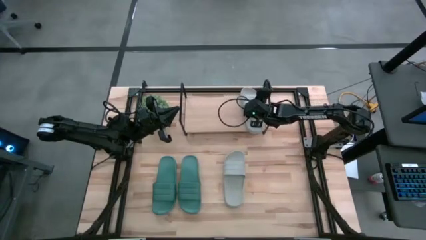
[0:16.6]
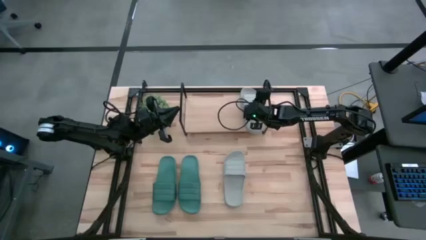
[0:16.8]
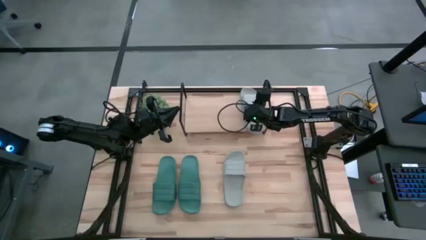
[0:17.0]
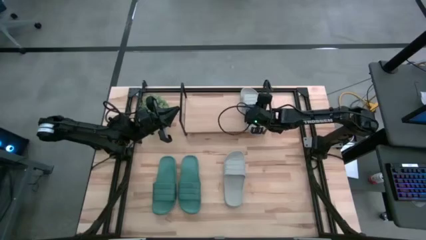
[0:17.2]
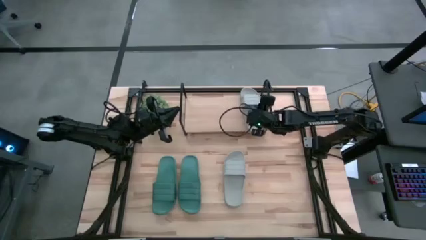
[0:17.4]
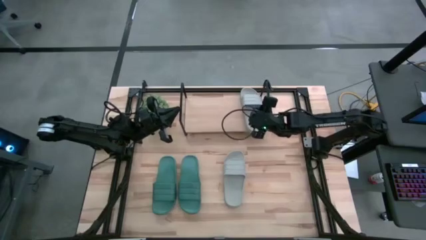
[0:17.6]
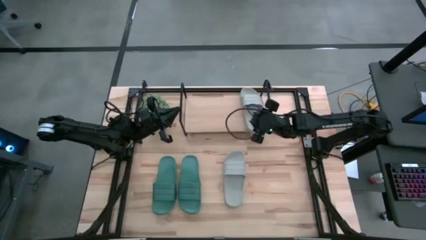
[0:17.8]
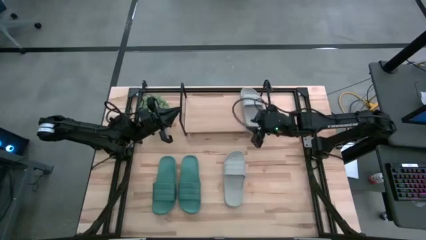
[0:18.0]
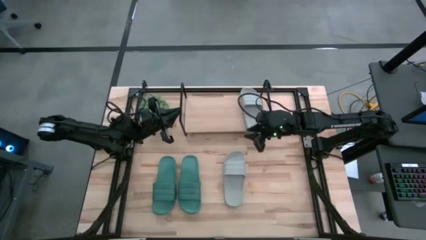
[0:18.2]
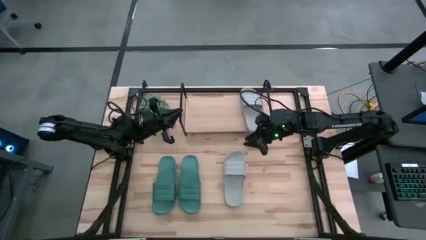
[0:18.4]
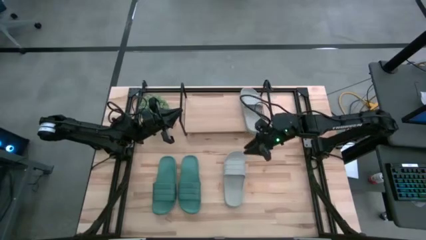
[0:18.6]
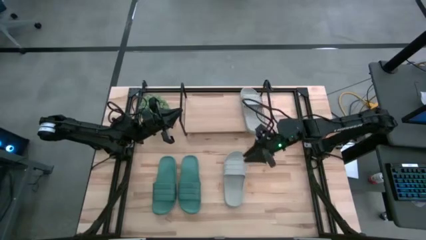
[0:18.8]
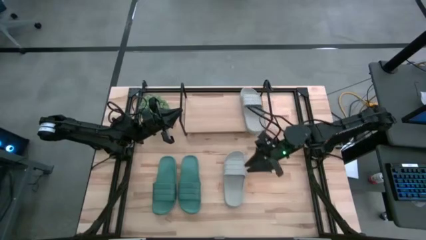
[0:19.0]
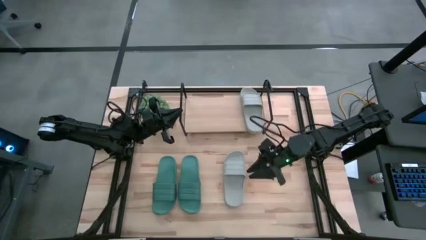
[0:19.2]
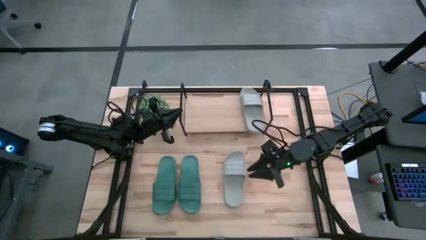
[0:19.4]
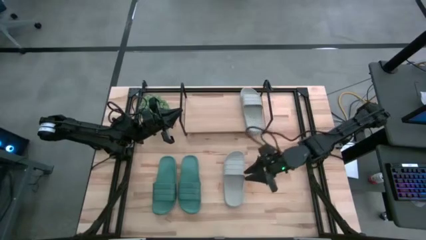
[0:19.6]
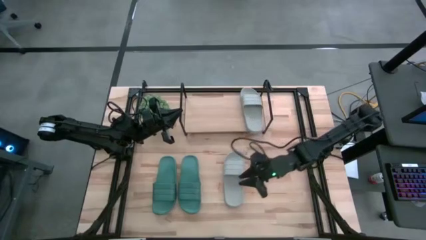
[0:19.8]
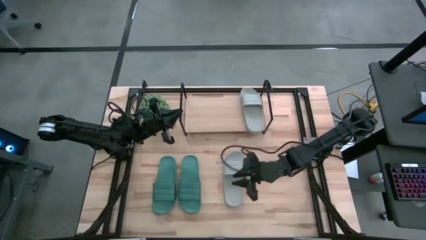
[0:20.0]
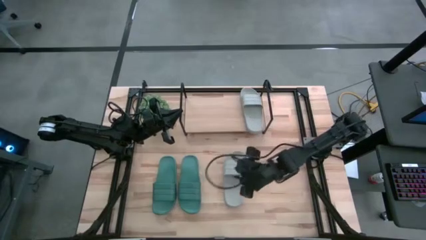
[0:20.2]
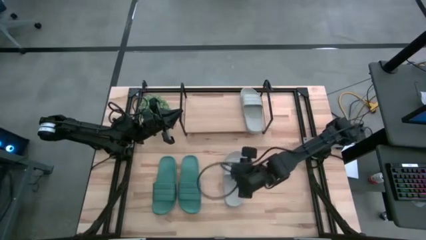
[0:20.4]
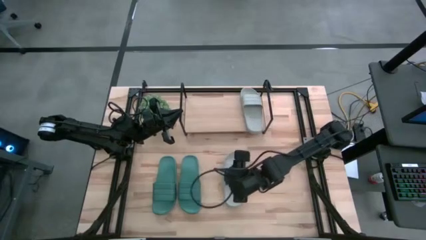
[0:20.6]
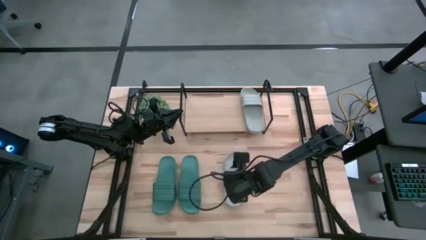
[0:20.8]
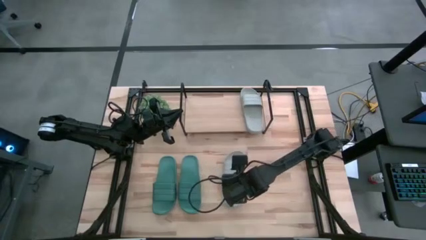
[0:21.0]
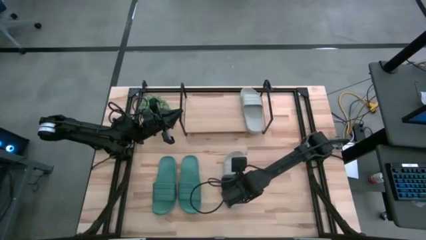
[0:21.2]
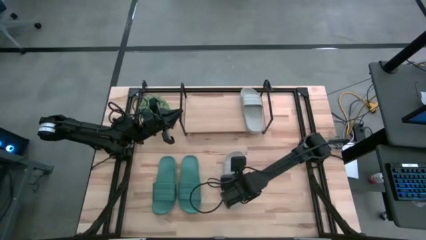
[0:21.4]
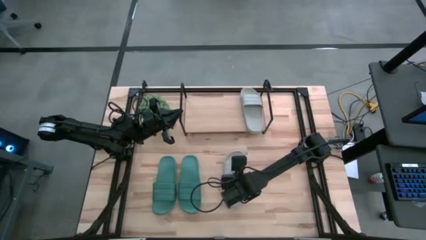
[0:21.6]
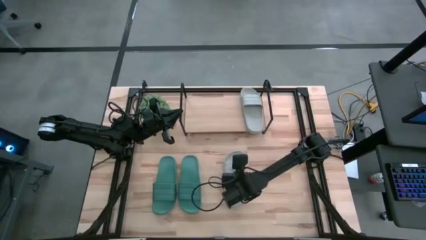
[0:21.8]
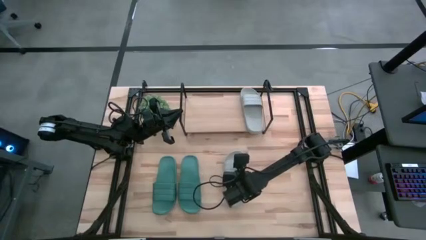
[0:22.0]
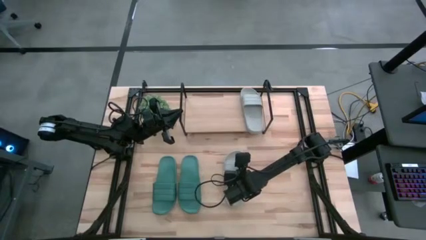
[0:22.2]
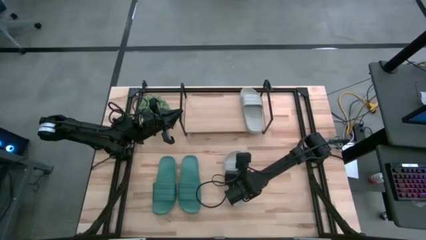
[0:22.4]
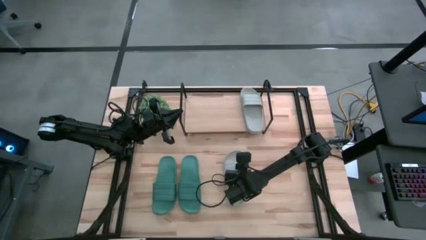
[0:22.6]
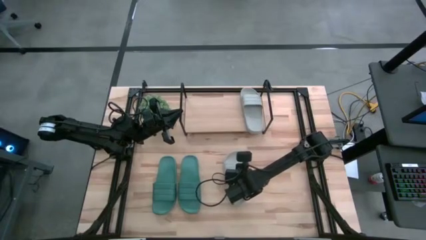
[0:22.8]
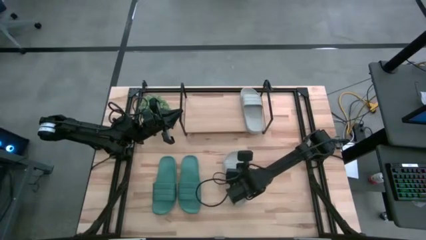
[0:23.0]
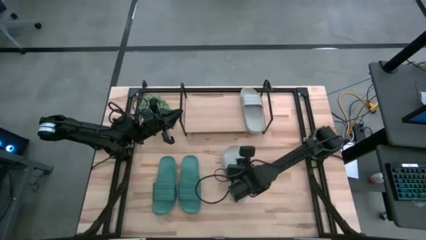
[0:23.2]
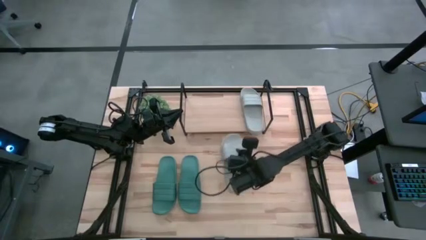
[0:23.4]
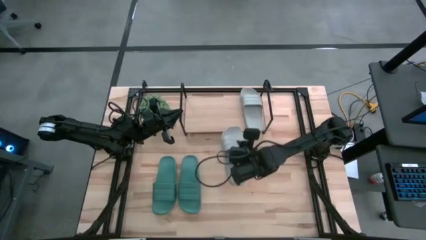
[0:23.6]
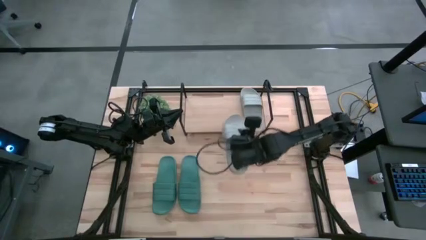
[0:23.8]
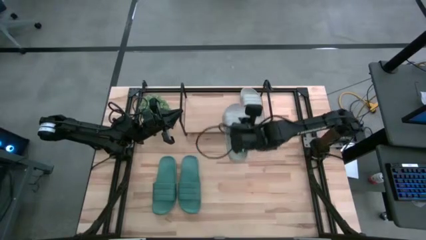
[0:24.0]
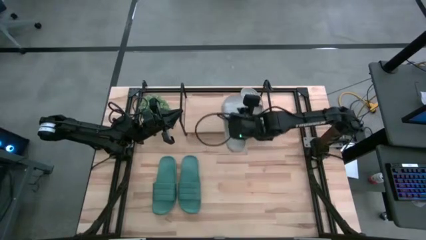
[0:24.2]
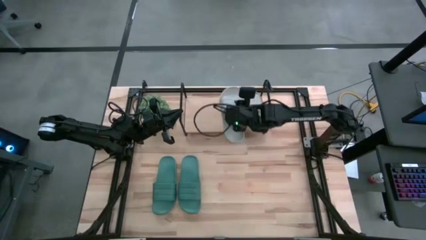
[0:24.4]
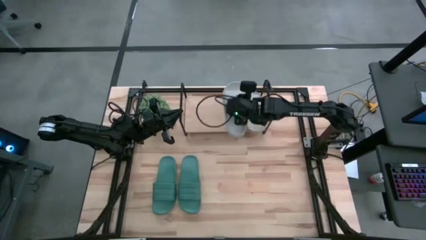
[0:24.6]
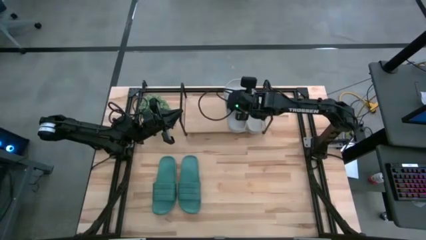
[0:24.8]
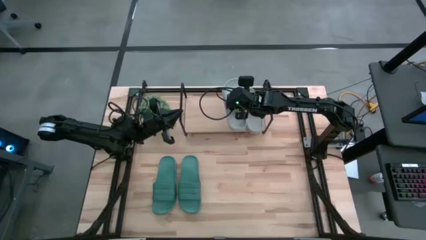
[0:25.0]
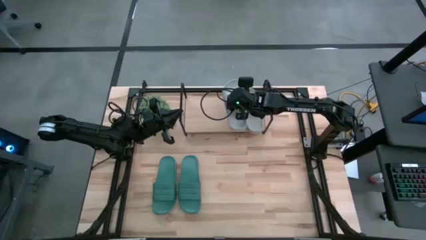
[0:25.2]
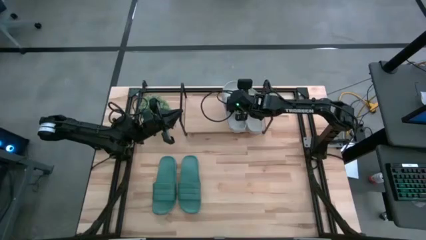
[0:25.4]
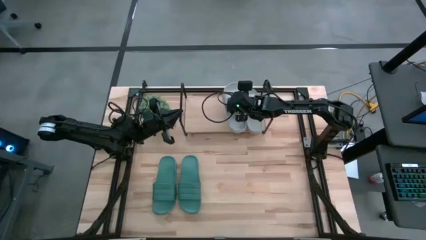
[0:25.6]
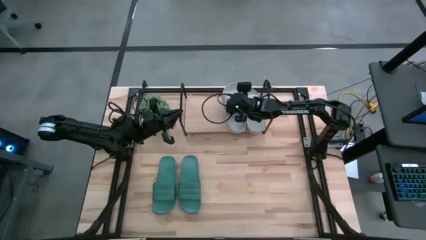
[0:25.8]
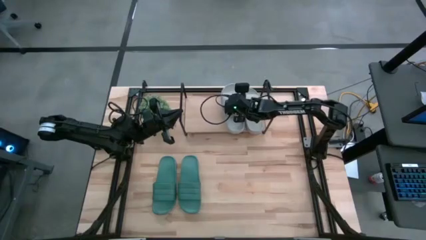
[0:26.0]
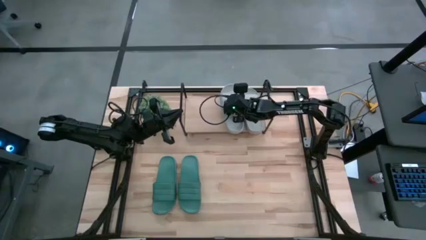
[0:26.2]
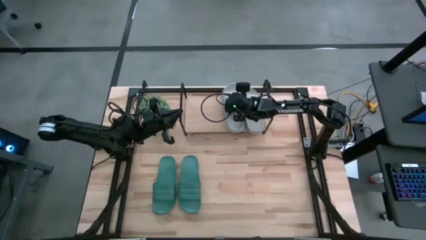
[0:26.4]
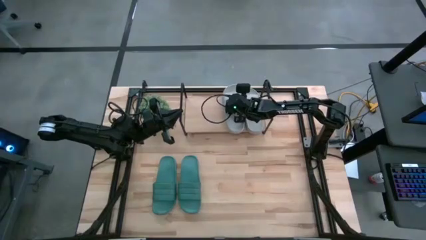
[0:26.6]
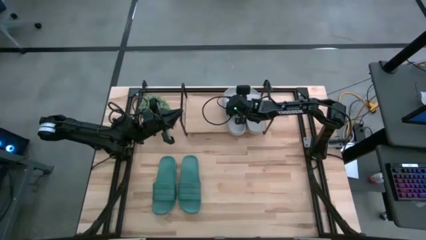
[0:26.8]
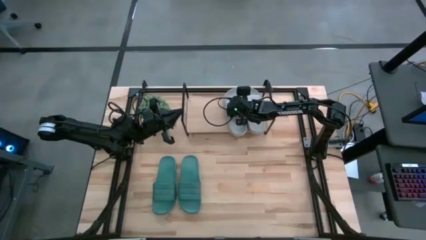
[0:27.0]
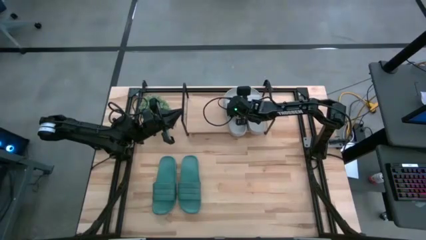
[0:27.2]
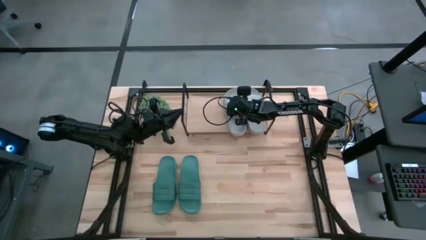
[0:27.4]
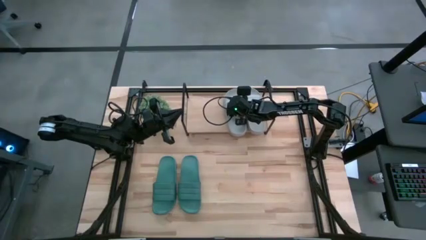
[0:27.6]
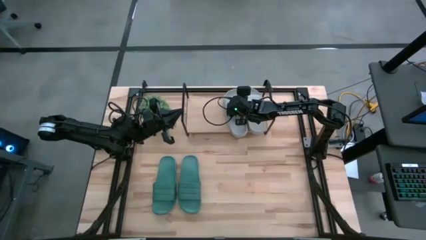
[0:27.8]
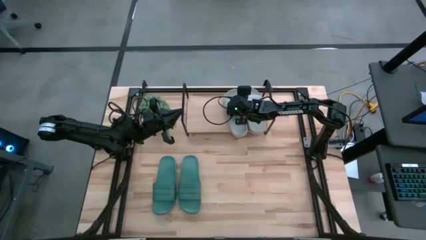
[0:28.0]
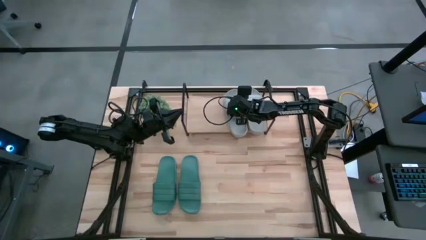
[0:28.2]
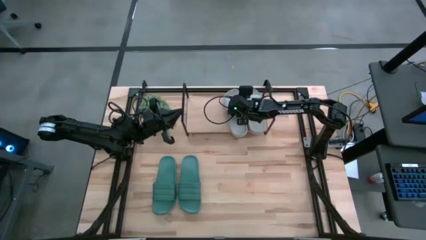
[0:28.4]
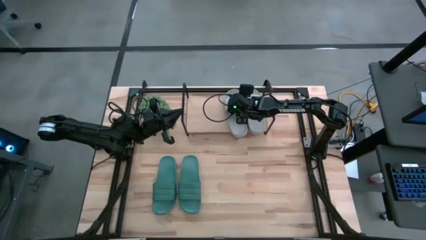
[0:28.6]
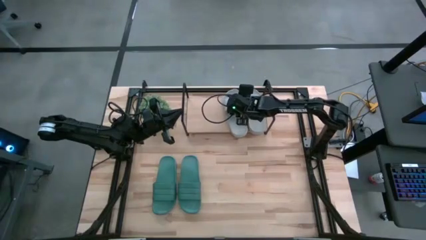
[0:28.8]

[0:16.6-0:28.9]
Task: Pick and place slides into the shelf
Put the gray slide on the shelf

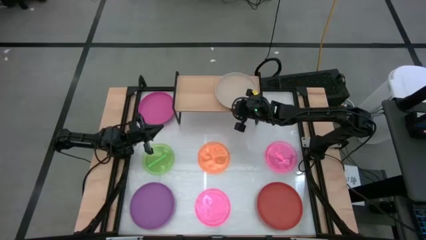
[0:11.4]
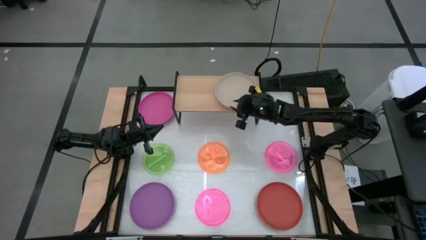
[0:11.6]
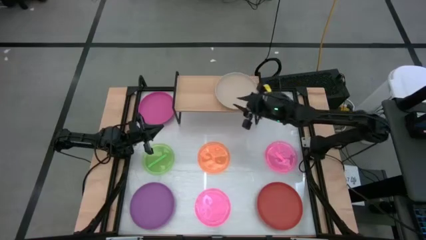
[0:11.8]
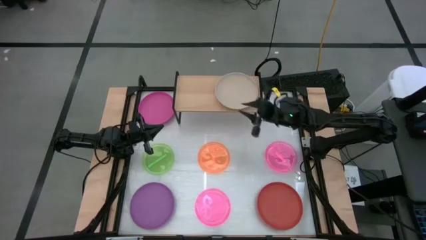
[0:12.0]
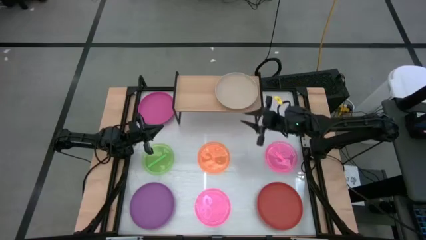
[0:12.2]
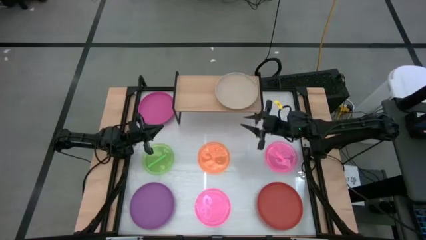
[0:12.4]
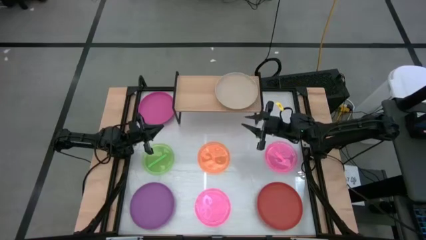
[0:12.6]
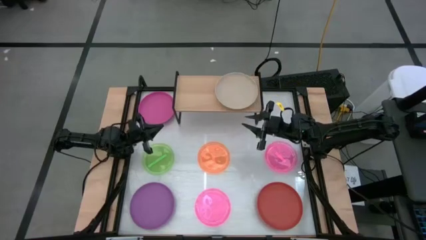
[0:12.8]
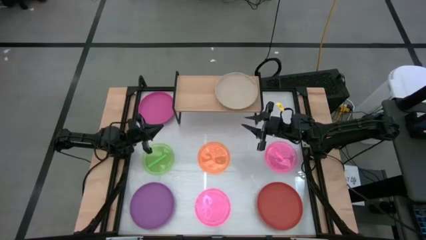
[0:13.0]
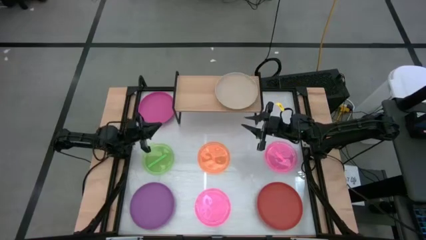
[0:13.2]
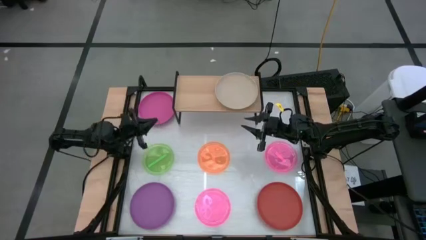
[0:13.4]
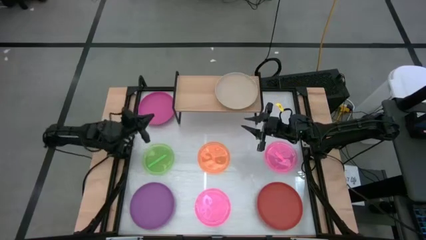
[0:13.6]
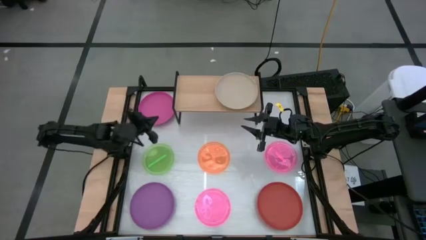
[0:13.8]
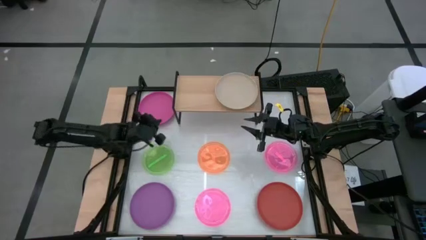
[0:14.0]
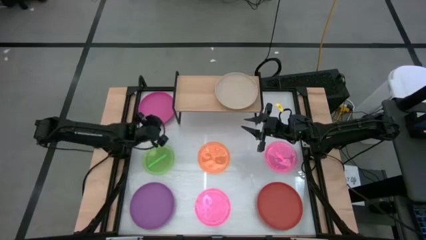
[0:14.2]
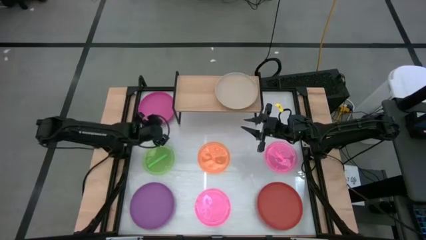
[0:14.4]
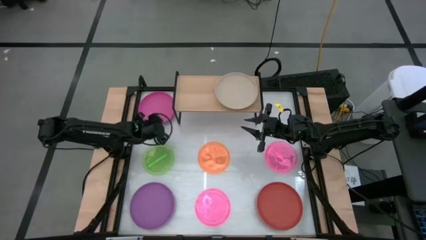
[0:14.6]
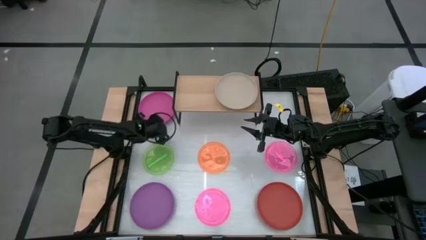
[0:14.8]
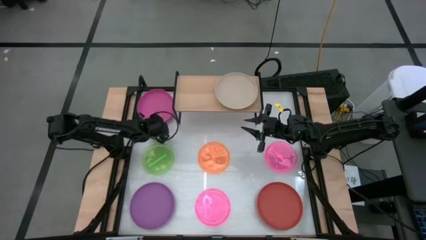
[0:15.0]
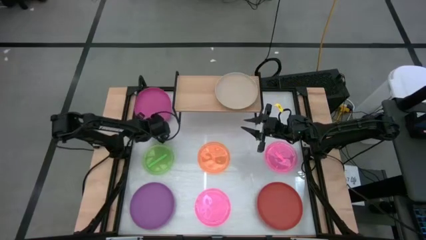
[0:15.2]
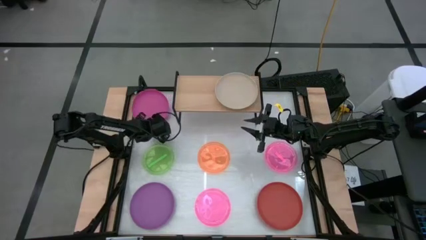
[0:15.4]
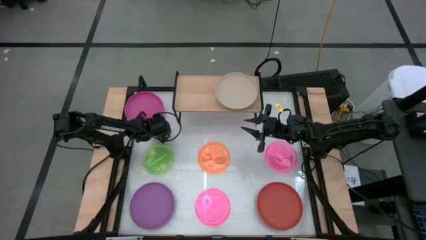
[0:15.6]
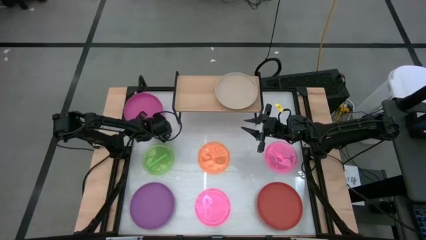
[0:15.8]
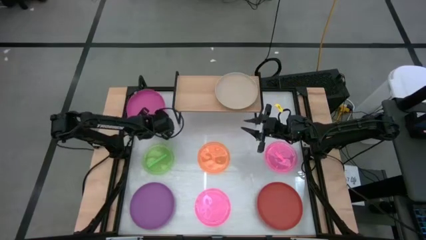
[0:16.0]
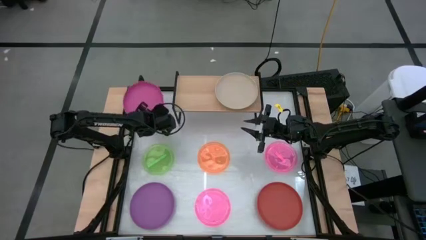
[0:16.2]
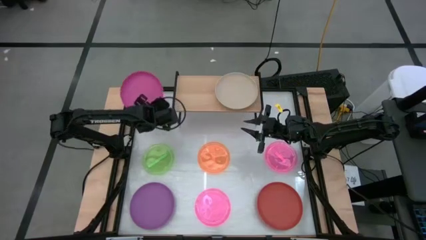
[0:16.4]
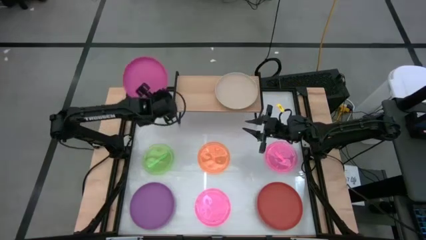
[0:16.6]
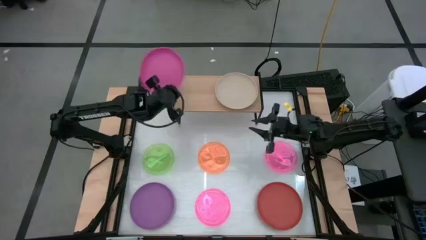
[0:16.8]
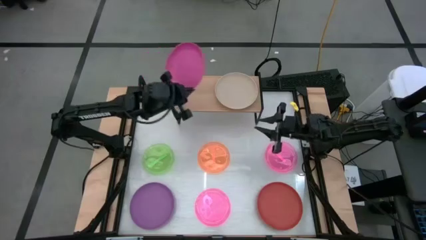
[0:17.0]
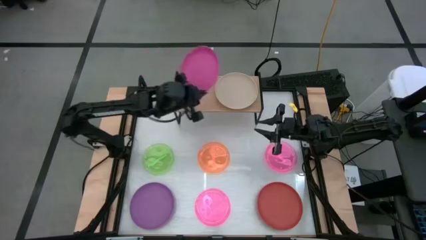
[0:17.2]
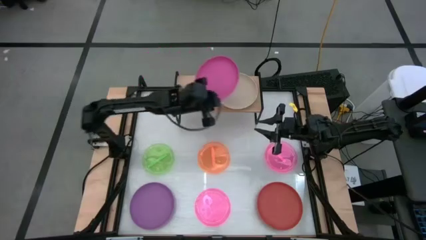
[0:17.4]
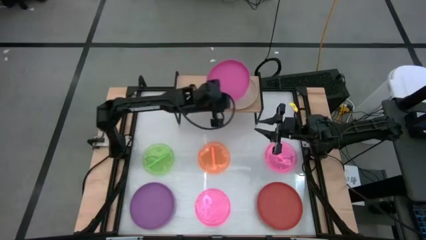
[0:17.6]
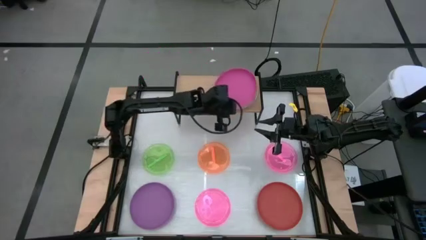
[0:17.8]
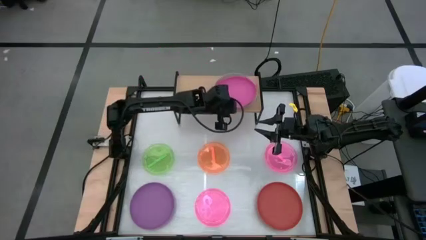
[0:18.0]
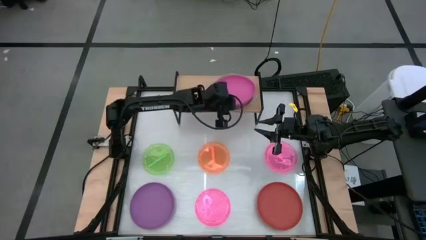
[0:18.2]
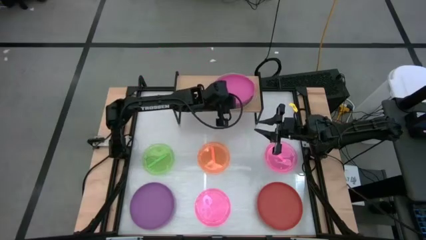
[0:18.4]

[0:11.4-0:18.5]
Task: Place and stack plates onto a shelf
Stack the pink plate on top of the gray plate on the shelf
